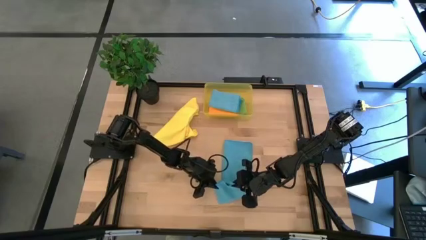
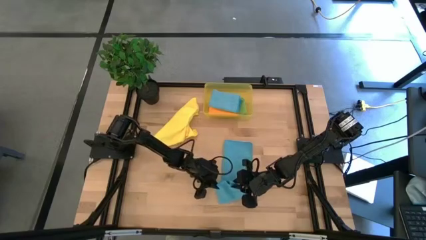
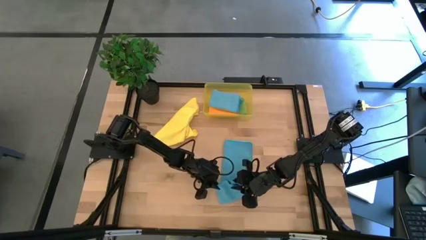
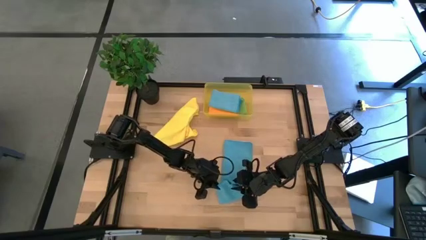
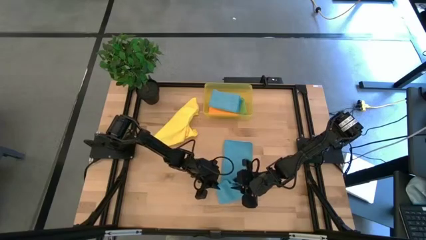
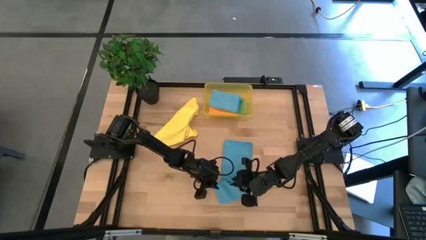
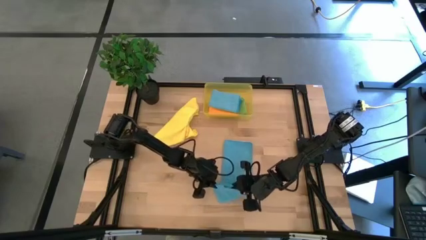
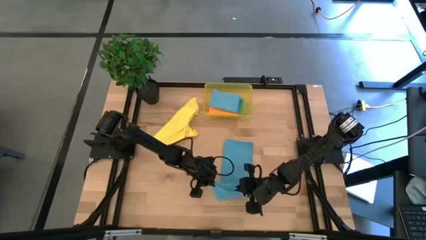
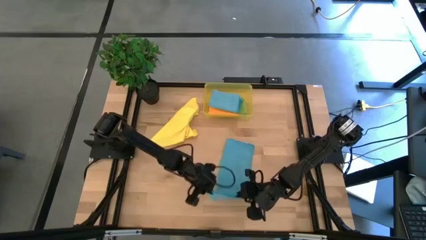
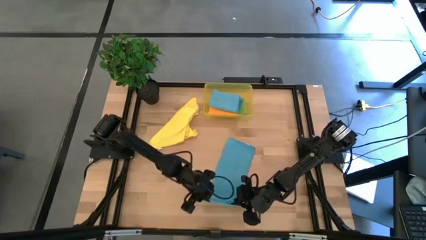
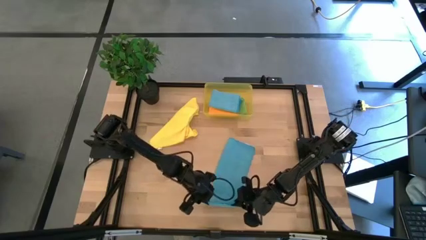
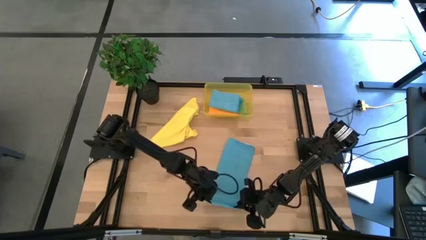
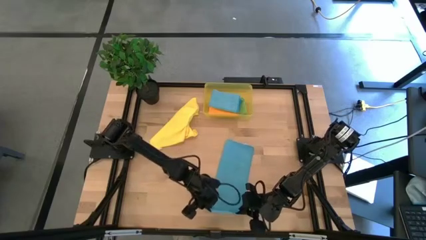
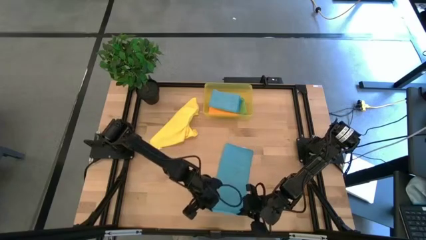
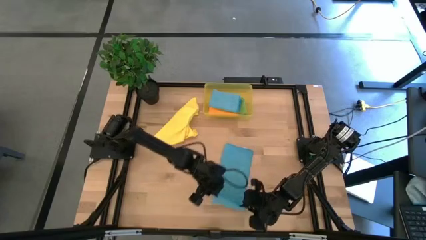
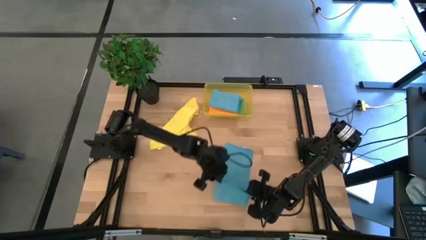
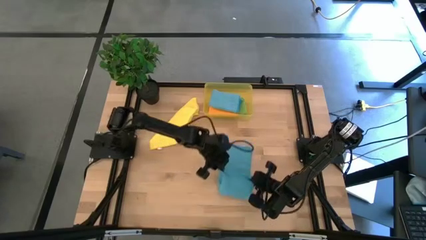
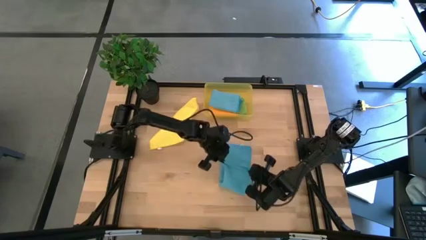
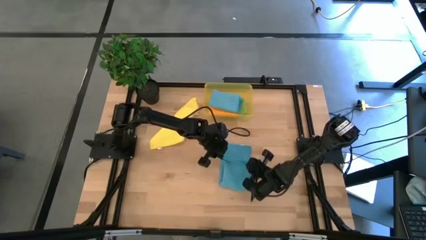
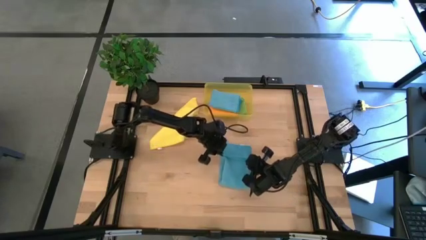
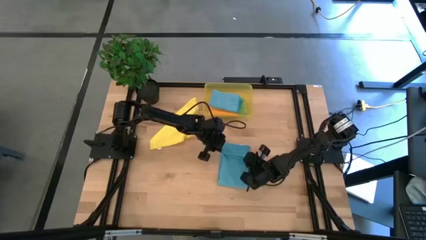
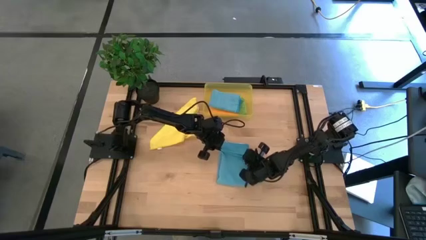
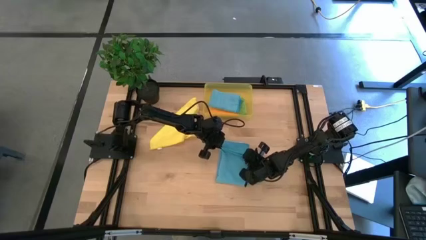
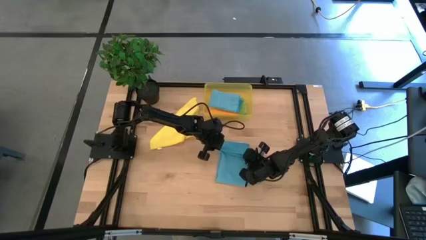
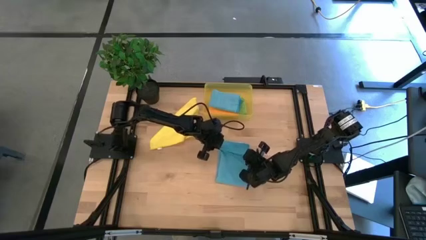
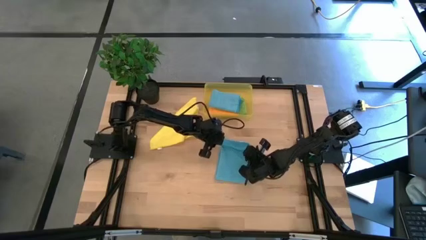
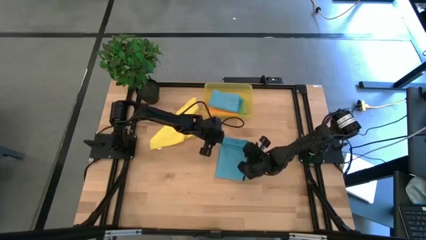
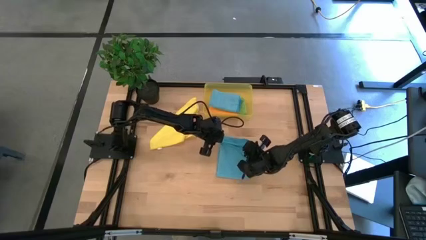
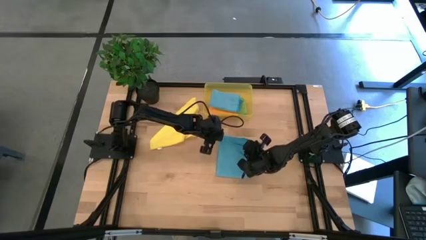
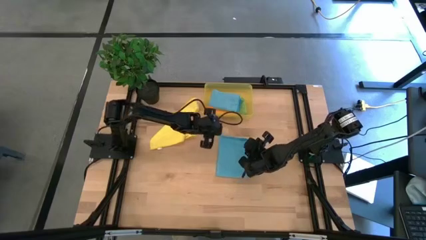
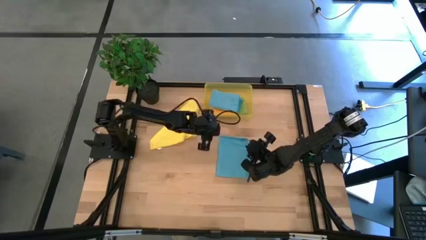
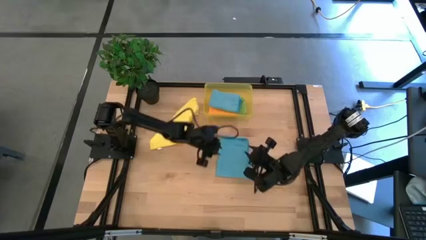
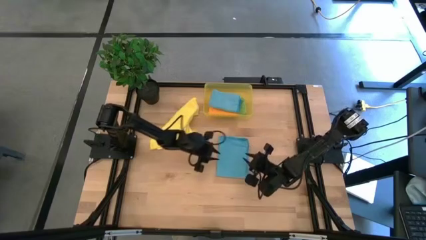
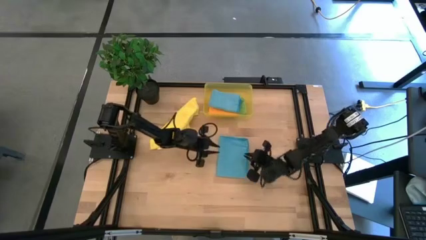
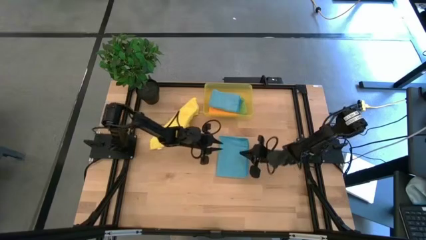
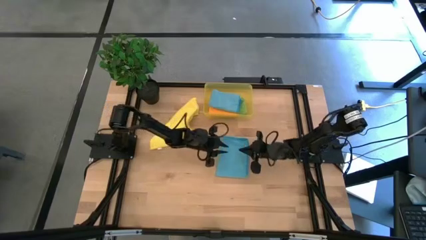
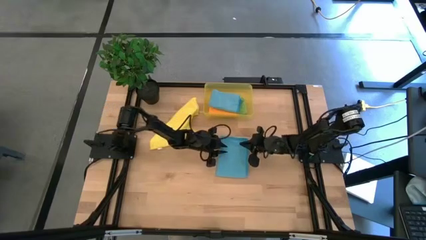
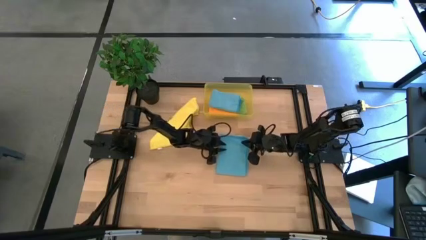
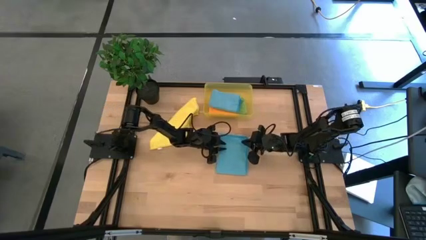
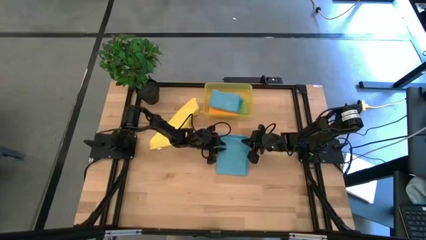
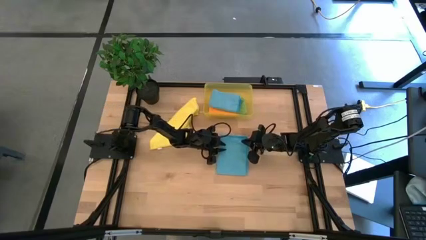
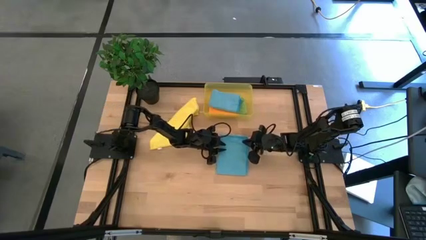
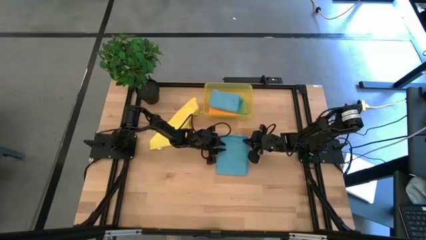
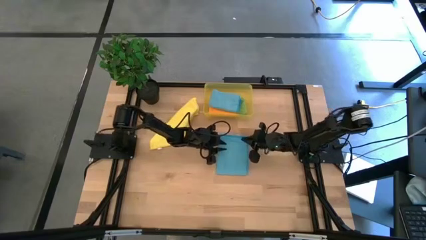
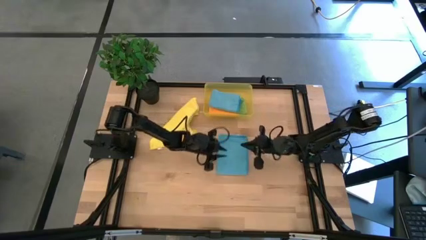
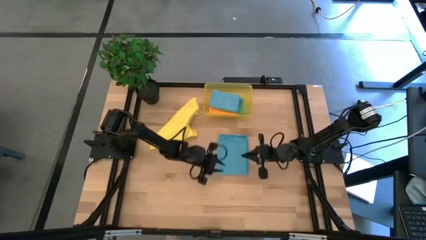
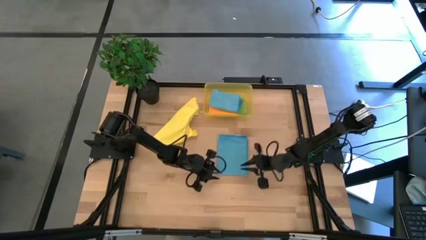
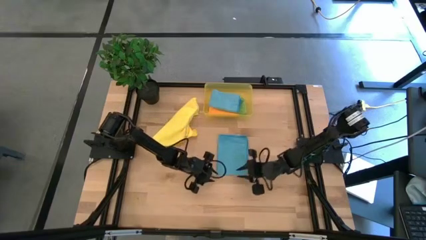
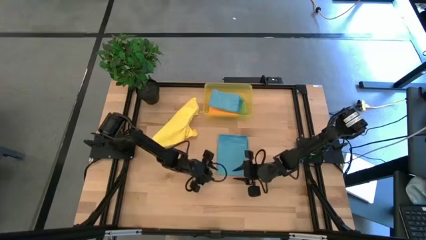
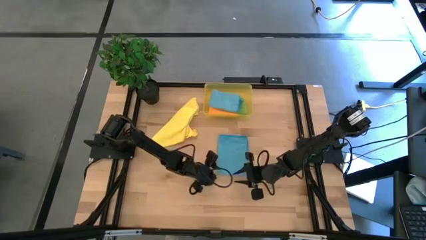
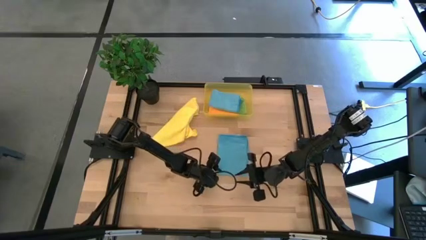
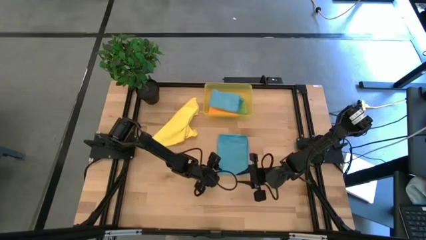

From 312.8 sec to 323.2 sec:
Task: Fold microfiber towels
Fold the blue microfiber cloth

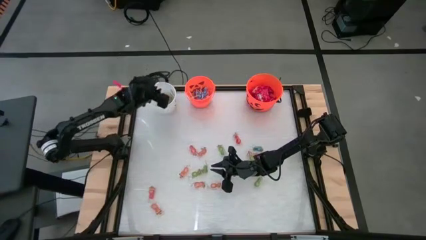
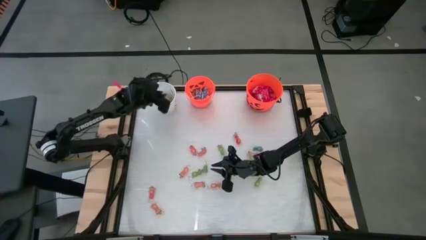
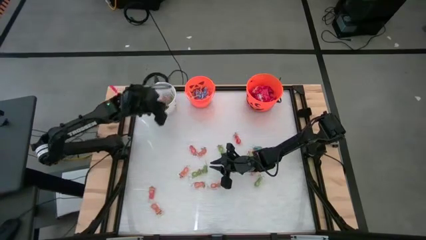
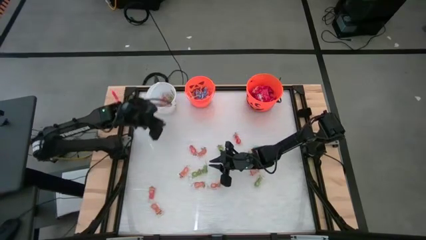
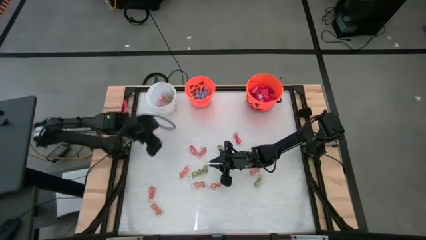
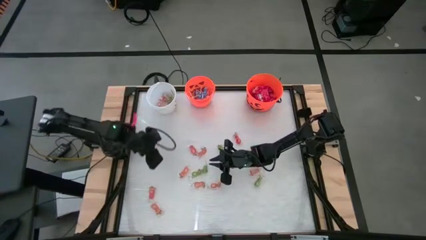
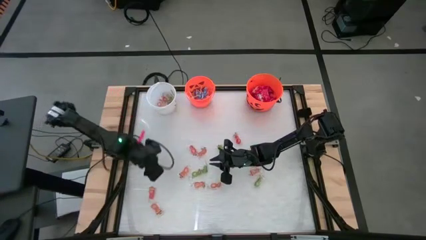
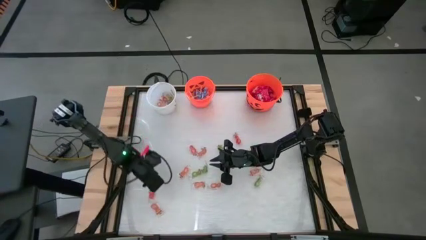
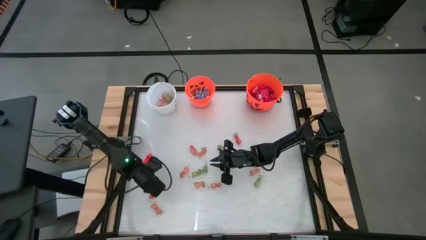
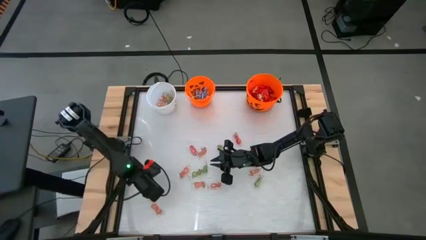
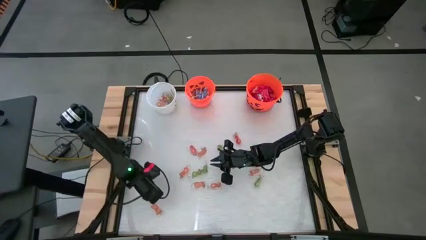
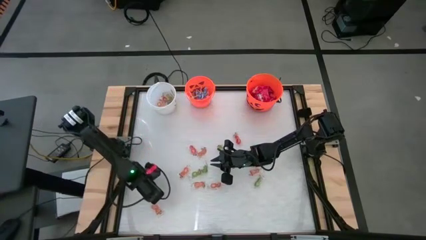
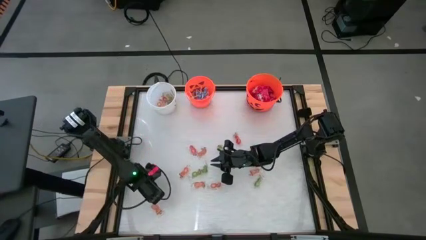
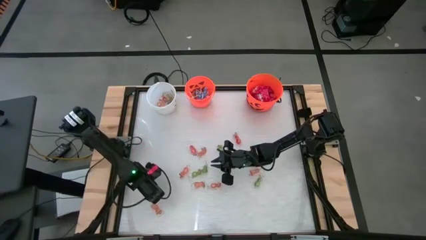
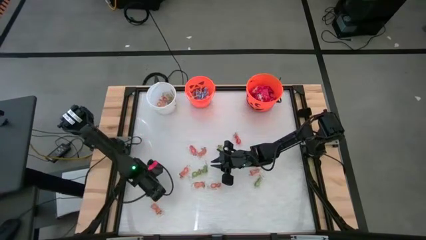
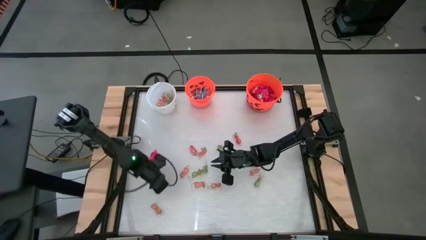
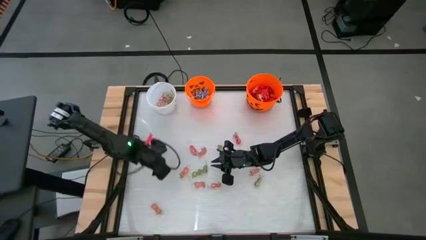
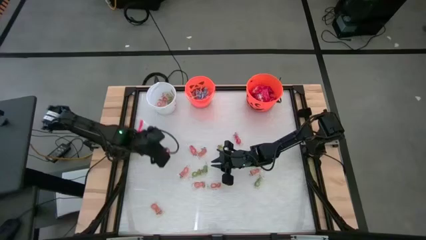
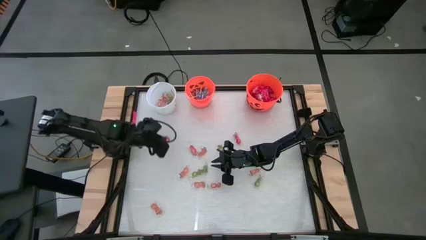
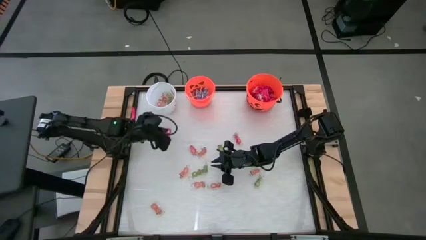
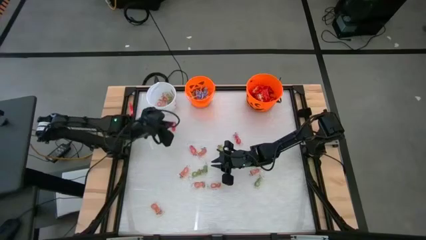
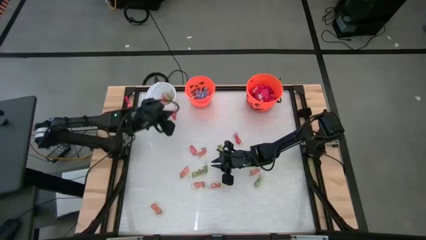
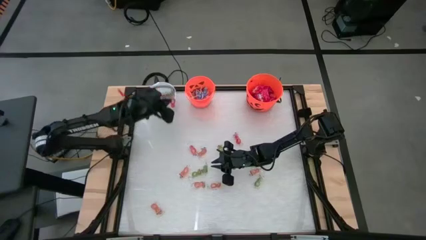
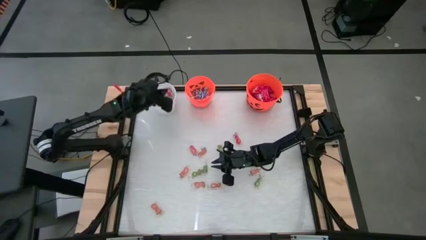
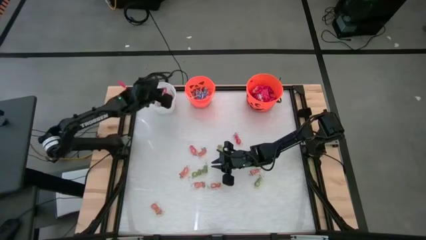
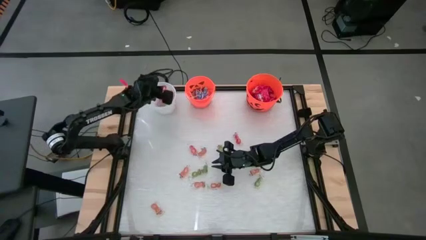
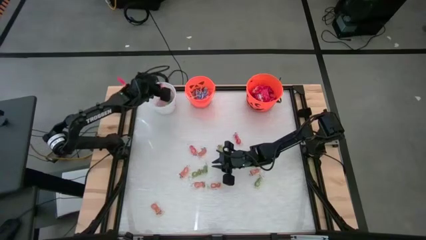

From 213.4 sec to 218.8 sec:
Task: Sort candy by brand, put in halloween buckets
Put the orange gummy into the white bin
